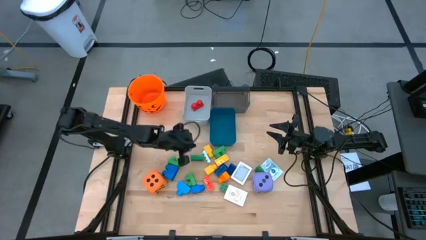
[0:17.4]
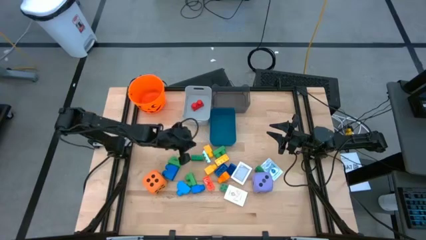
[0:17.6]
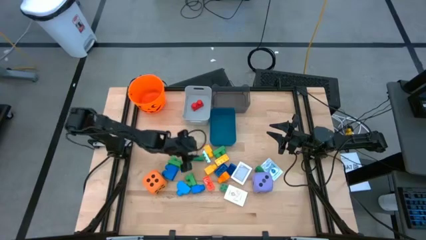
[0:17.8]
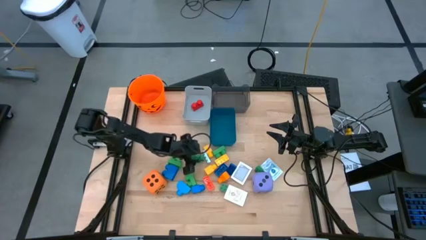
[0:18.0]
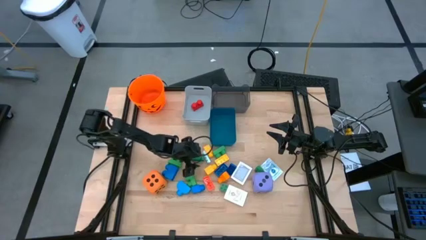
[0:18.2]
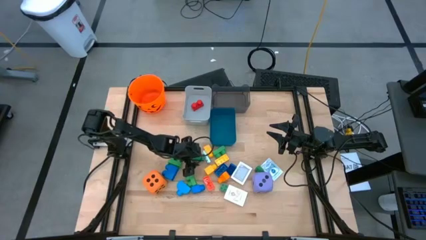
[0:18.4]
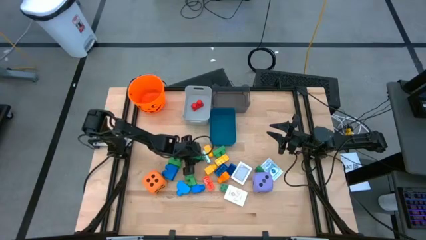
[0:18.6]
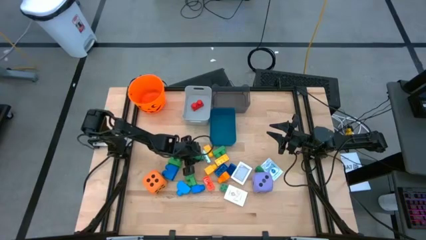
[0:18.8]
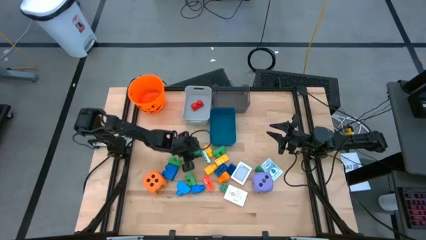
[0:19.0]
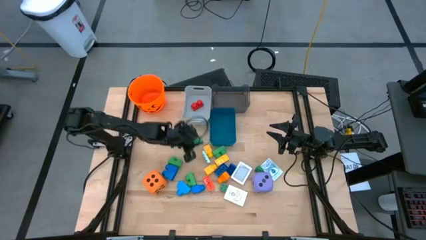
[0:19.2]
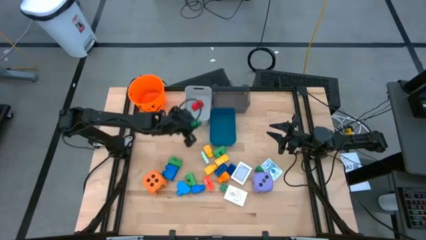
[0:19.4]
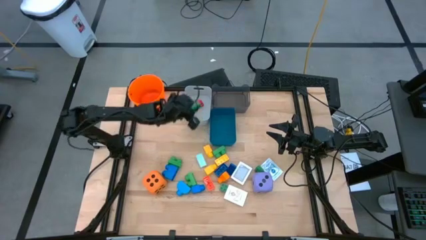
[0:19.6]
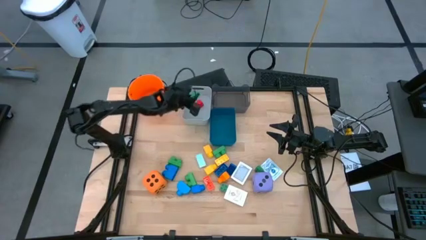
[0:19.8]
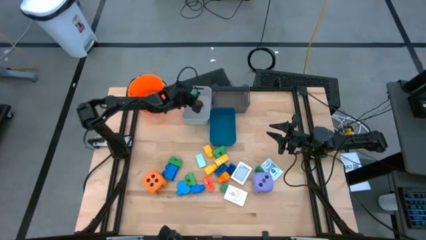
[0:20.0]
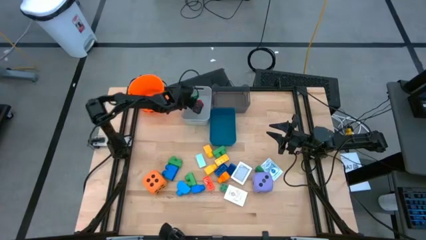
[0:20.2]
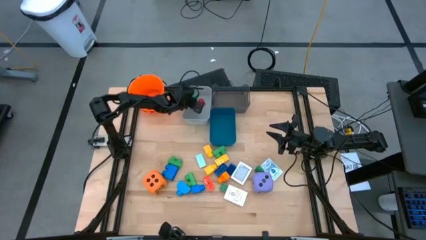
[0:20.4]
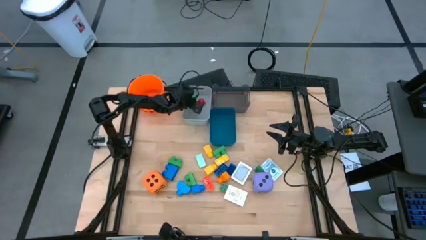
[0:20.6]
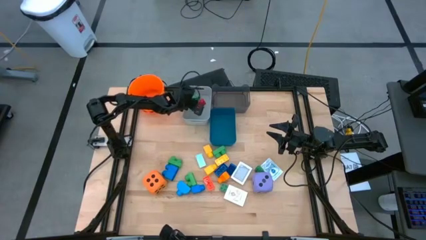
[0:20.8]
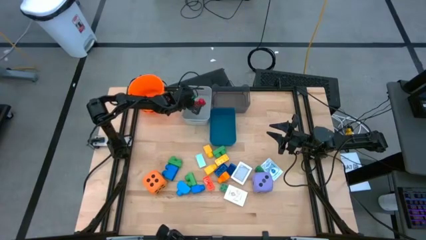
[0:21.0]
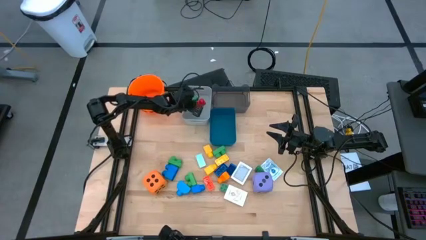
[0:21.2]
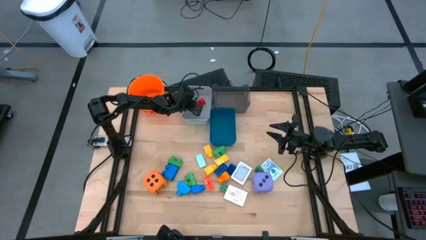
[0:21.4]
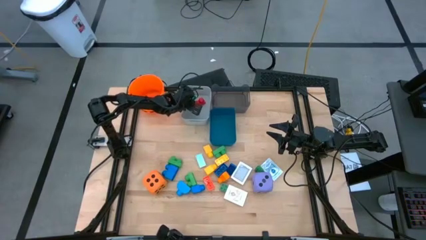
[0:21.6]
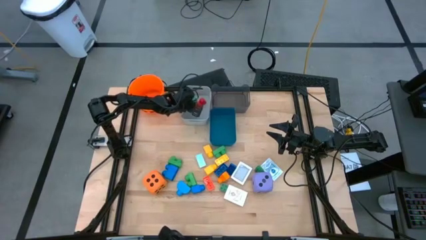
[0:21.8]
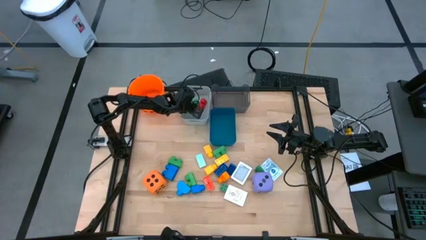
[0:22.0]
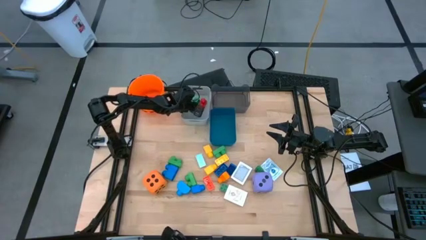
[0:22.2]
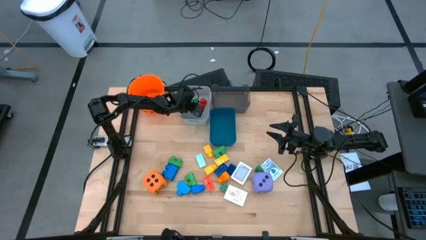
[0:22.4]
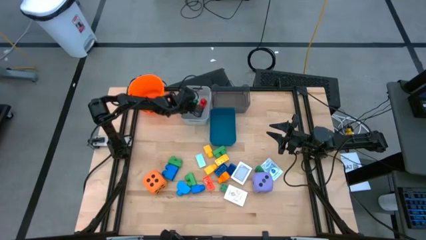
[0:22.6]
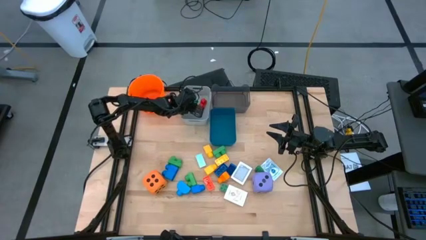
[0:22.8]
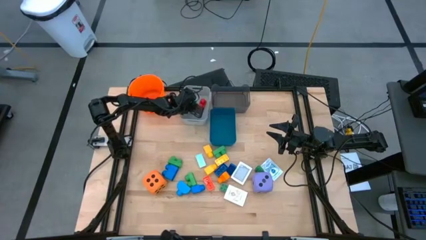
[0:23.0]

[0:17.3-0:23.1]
Task: Pick & Place Toys
Put the small green gamepiece into the white bin

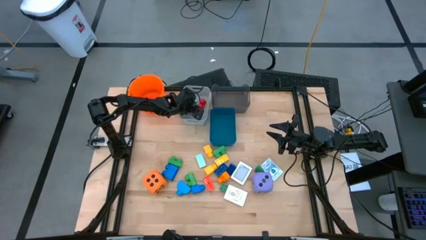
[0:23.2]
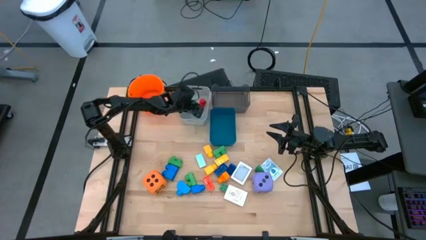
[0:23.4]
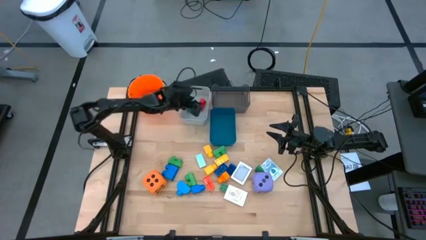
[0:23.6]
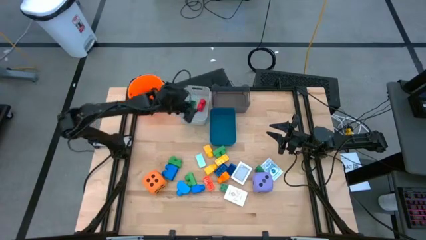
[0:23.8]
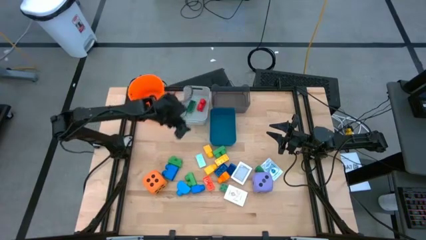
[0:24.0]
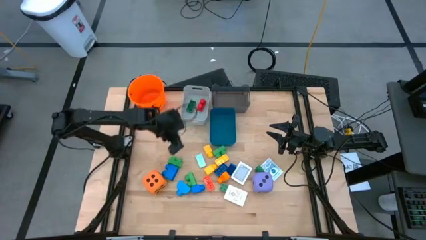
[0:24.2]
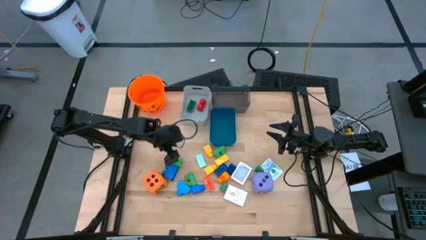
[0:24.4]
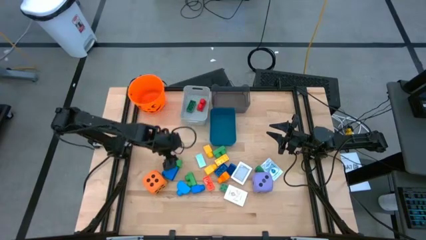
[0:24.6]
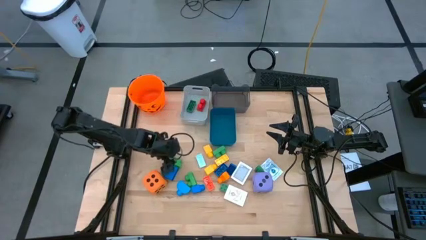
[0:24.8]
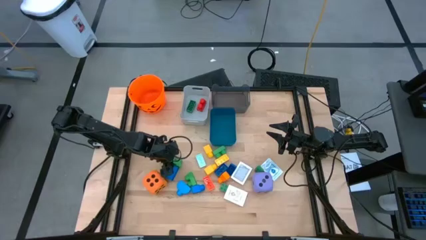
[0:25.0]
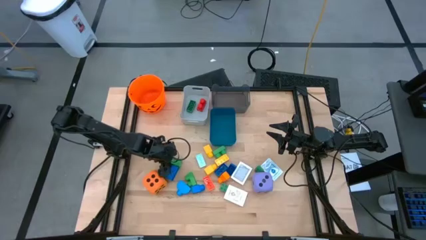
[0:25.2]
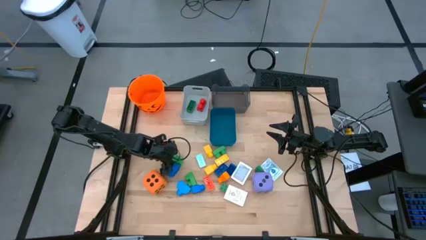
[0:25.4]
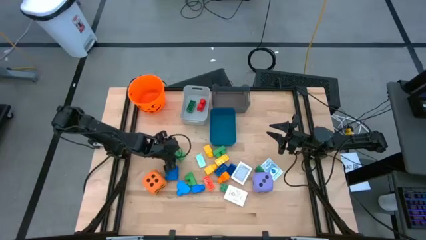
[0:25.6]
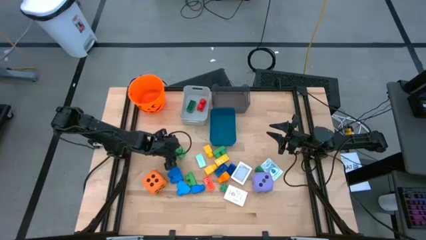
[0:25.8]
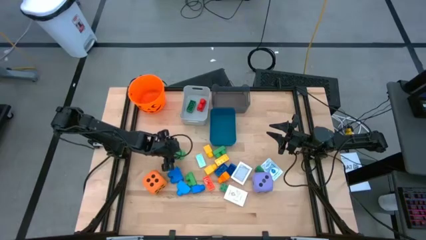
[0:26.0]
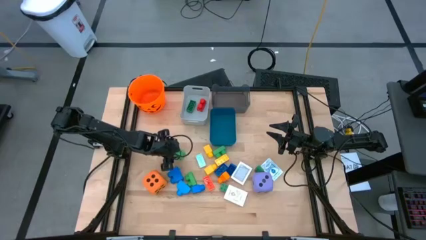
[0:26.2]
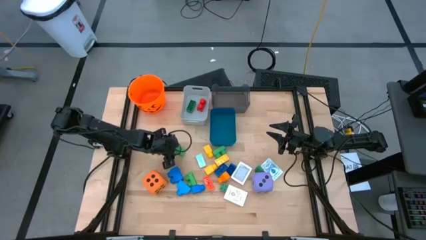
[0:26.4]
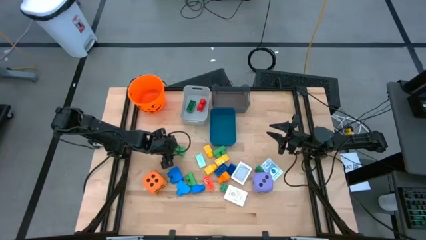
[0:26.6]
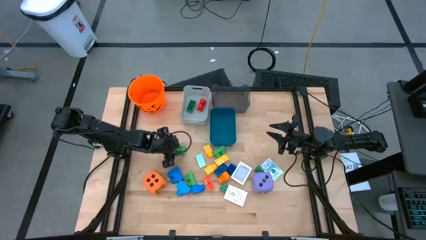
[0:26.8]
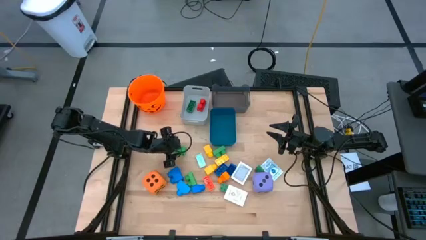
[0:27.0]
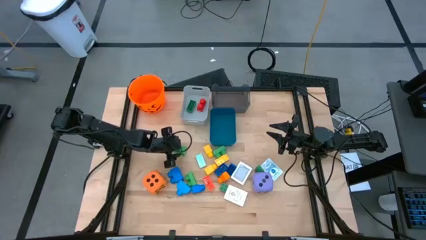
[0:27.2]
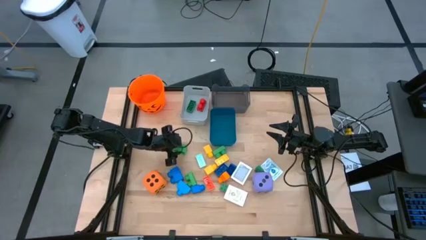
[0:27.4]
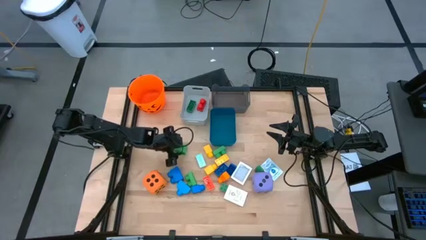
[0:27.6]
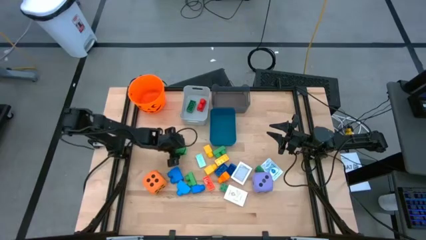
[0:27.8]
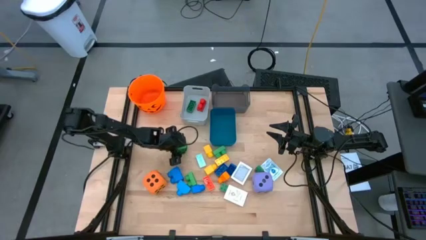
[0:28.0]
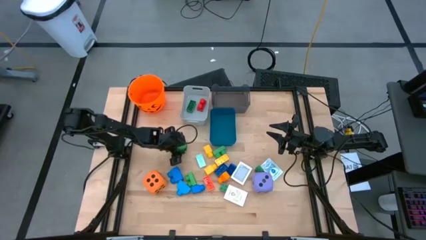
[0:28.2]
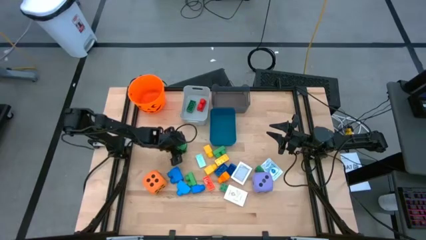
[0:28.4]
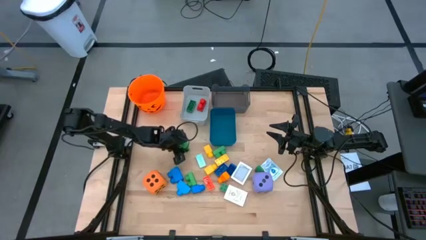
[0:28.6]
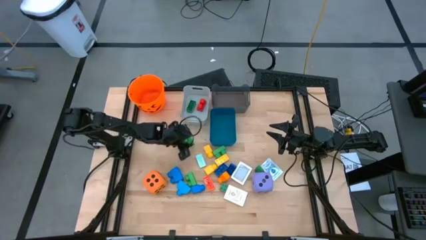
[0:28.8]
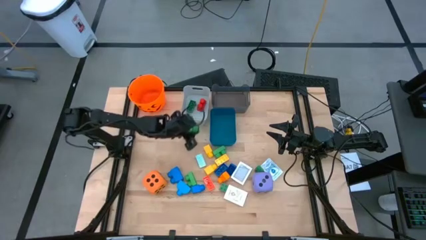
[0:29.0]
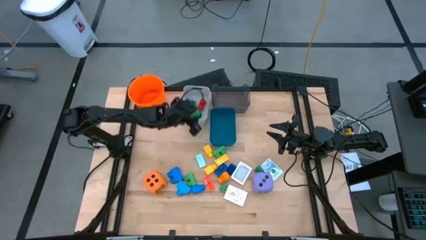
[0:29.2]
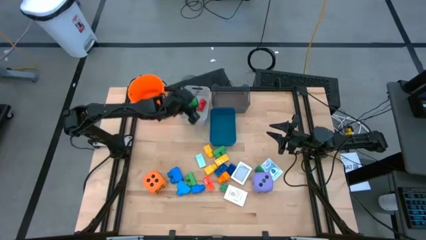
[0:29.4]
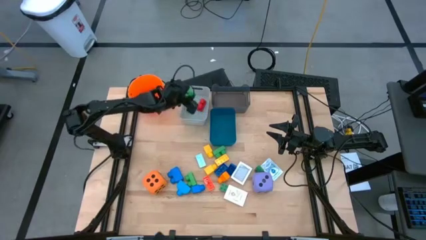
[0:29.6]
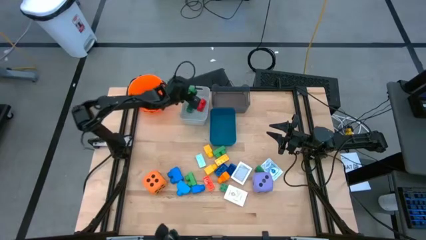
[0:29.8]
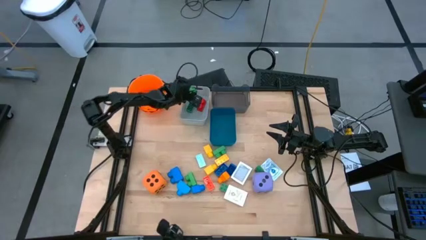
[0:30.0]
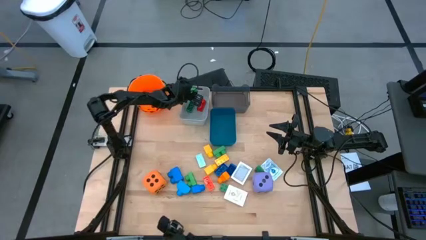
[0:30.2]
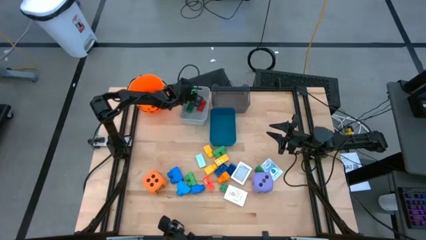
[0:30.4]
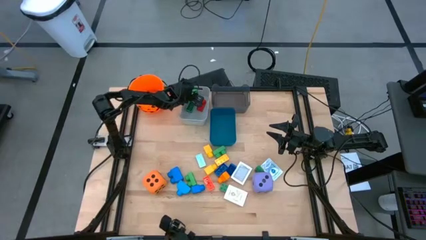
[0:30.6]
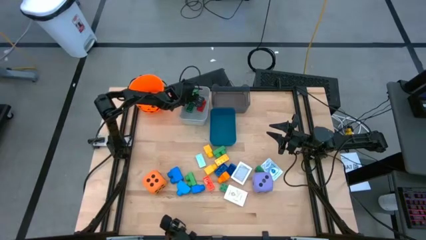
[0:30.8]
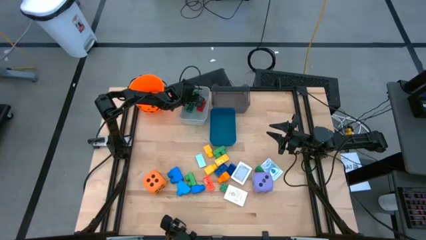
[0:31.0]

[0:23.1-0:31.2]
Put the green 2 stud gamepiece into the white bin

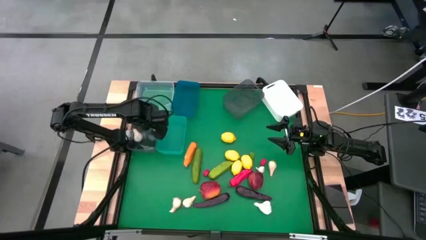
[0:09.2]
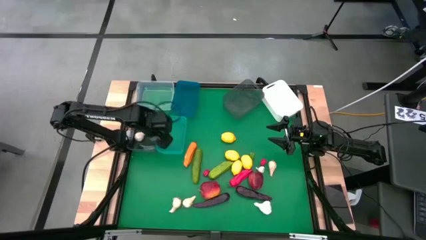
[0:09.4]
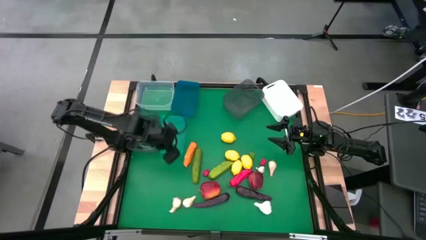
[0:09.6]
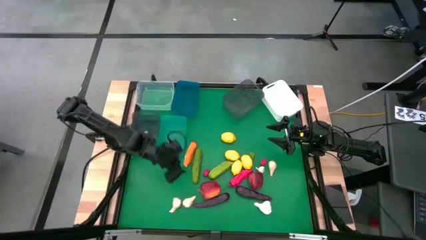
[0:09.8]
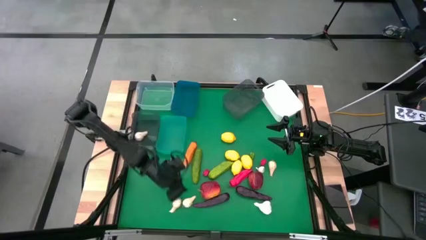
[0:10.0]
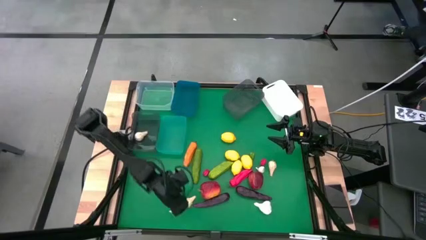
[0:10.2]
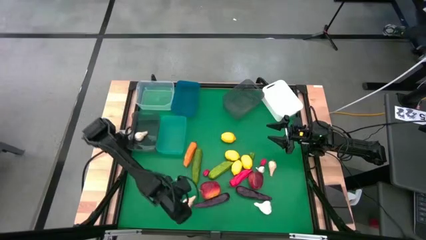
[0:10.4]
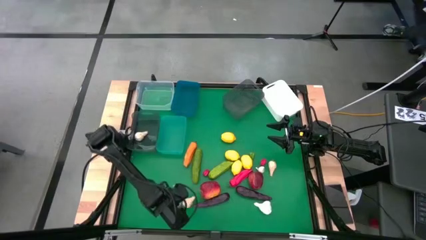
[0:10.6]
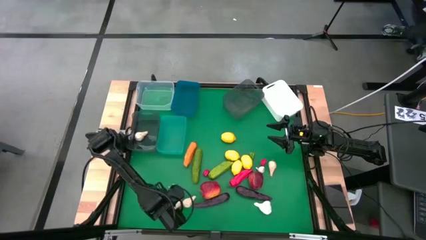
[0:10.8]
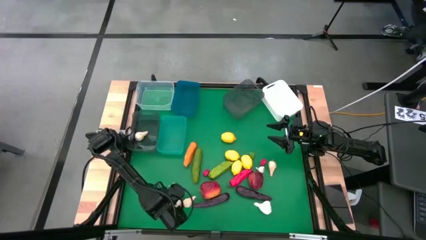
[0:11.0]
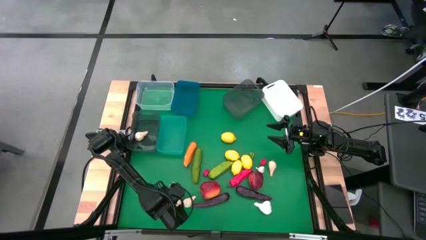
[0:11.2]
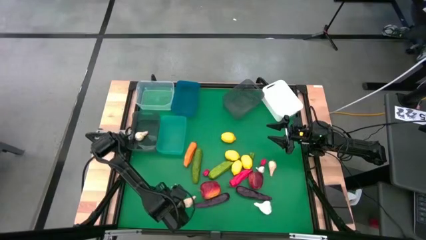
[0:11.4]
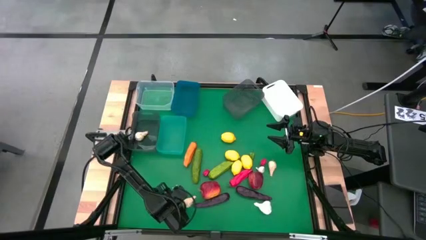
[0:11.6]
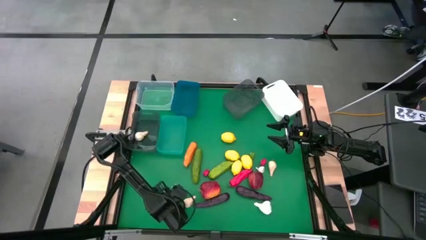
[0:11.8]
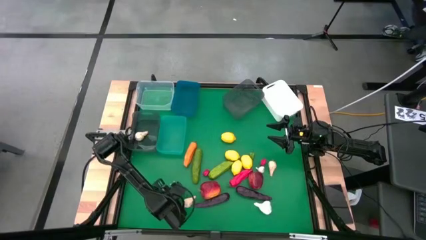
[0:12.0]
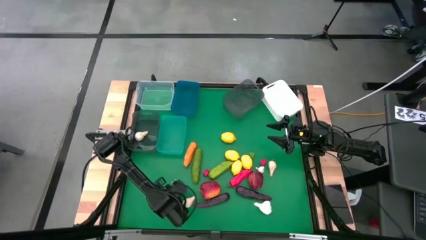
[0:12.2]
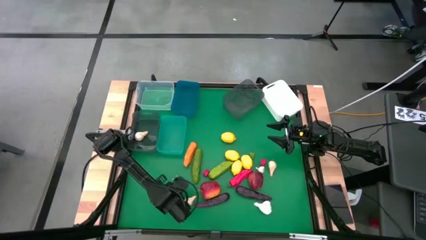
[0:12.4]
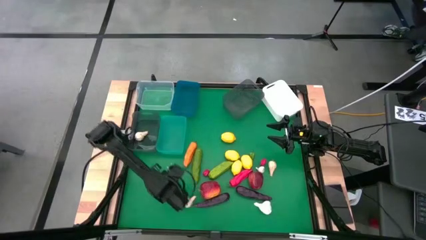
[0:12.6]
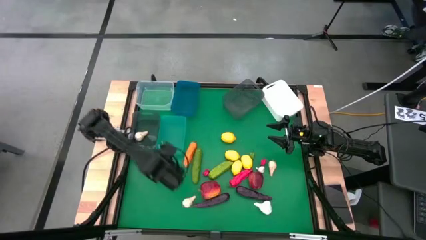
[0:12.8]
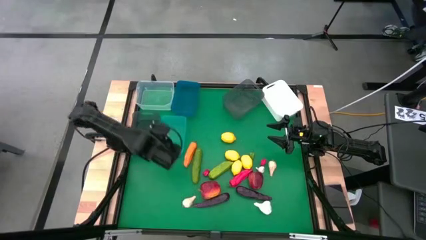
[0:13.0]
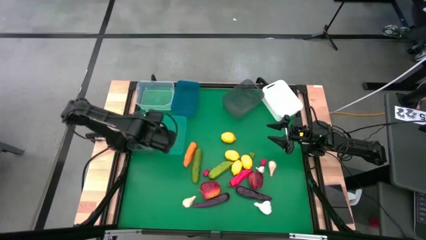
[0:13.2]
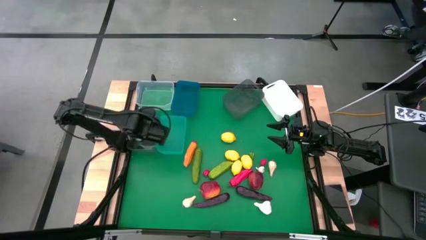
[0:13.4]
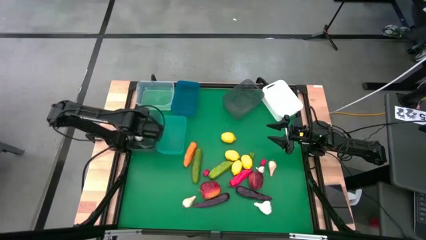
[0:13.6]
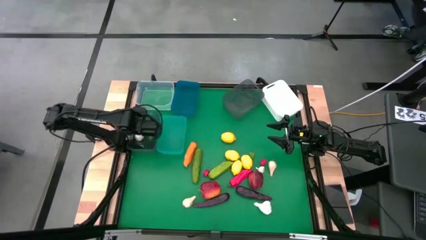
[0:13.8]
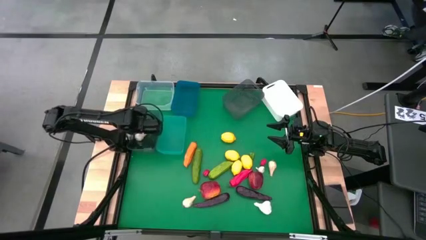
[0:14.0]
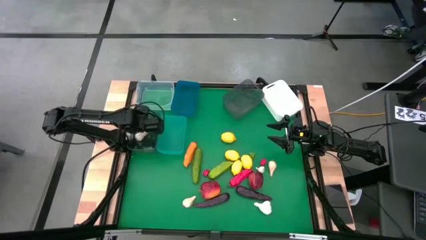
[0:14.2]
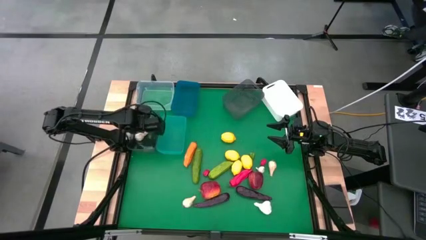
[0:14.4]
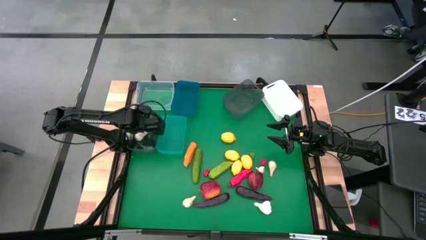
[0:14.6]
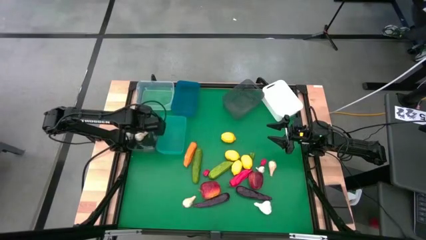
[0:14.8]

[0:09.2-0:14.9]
Task: Sort produce into baskets
Put the white garlic into the left black bin
